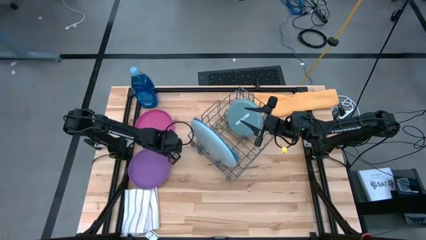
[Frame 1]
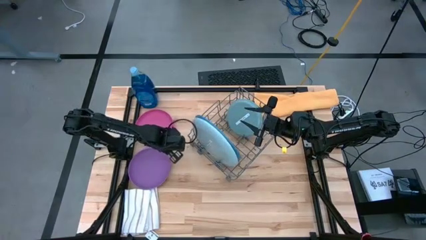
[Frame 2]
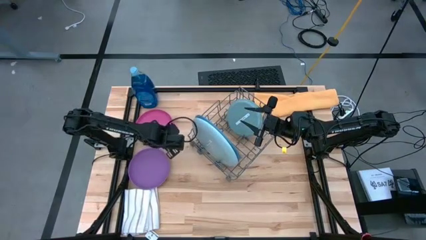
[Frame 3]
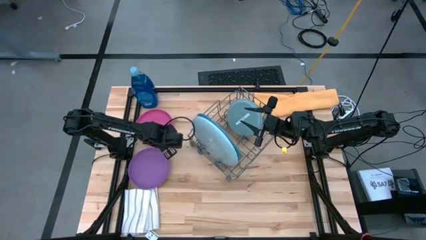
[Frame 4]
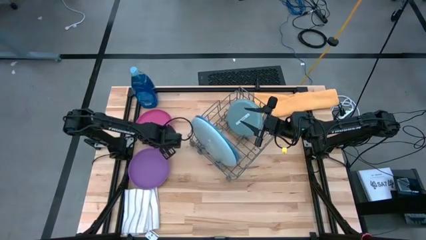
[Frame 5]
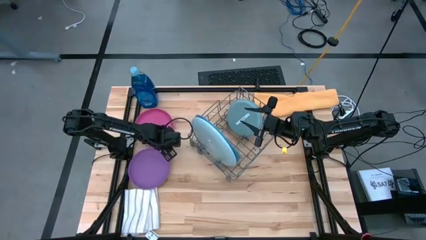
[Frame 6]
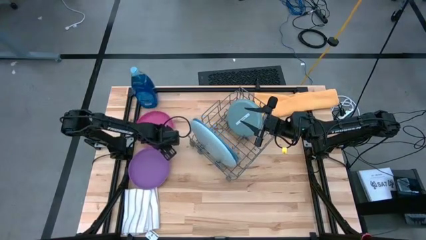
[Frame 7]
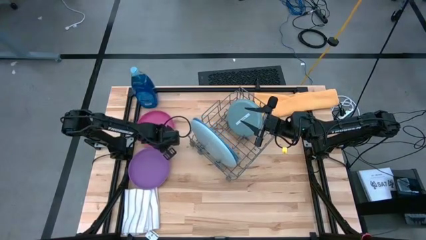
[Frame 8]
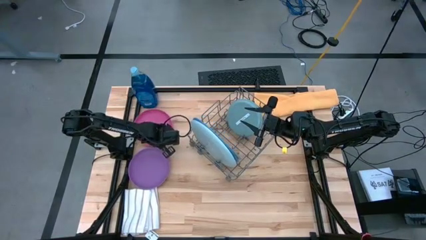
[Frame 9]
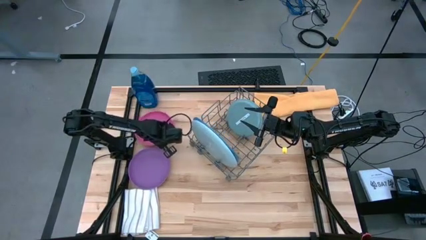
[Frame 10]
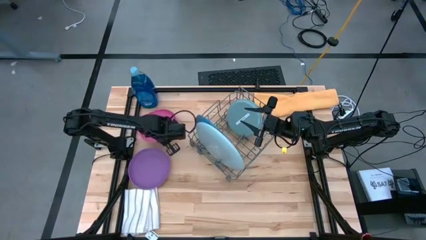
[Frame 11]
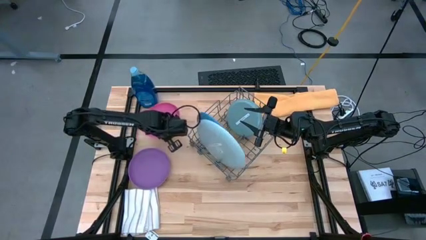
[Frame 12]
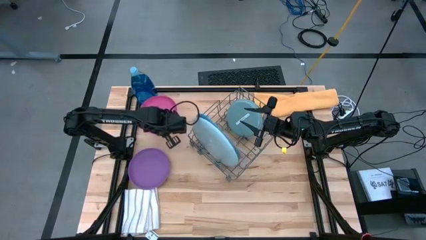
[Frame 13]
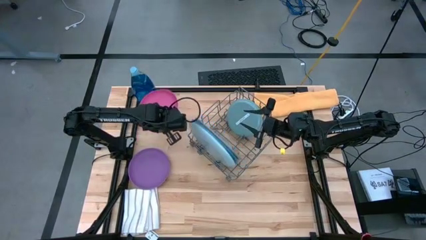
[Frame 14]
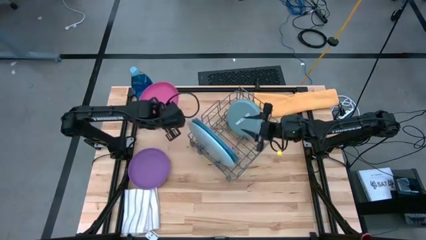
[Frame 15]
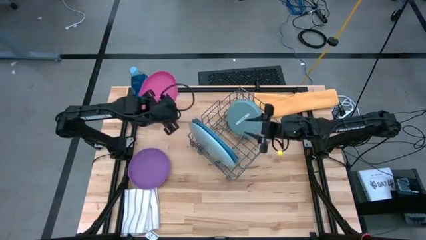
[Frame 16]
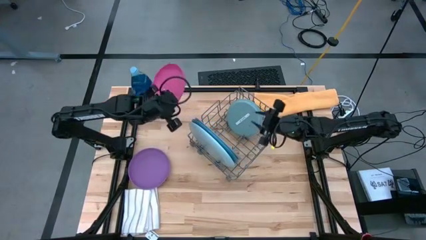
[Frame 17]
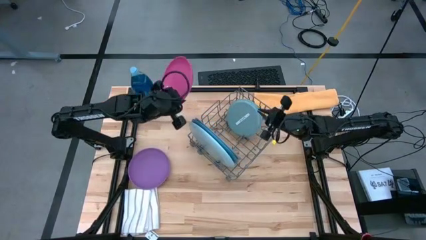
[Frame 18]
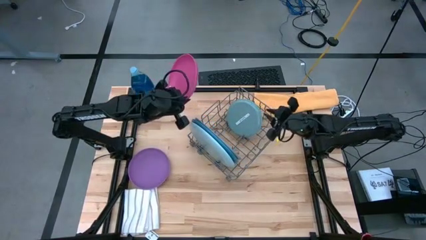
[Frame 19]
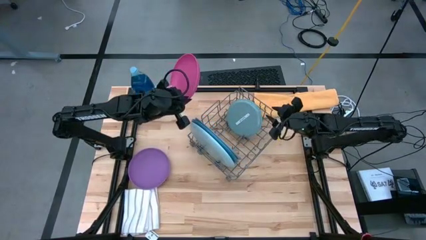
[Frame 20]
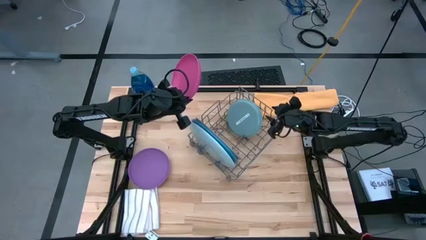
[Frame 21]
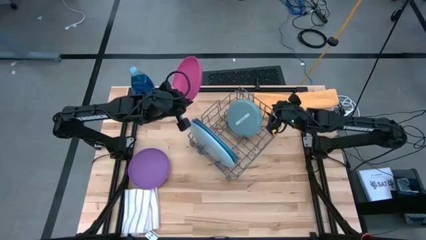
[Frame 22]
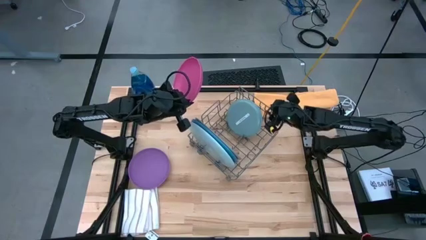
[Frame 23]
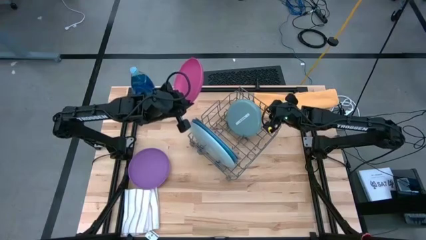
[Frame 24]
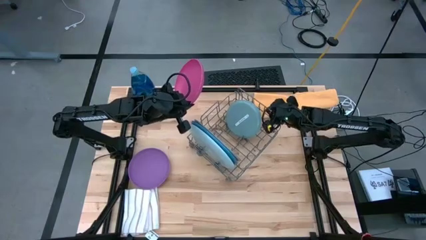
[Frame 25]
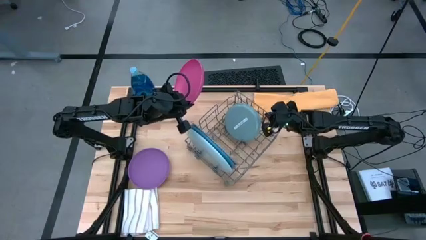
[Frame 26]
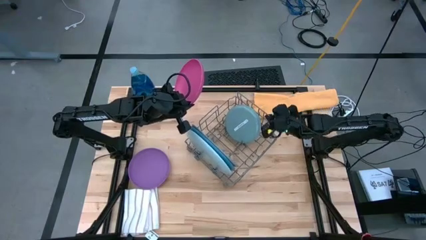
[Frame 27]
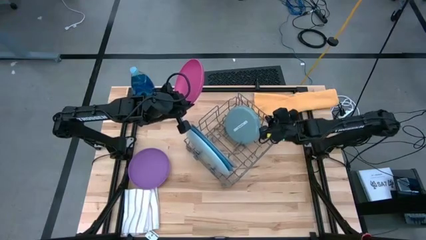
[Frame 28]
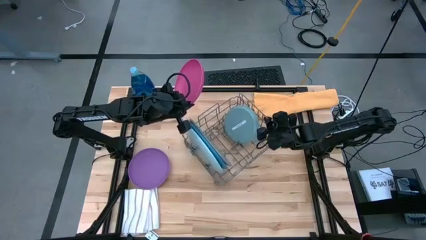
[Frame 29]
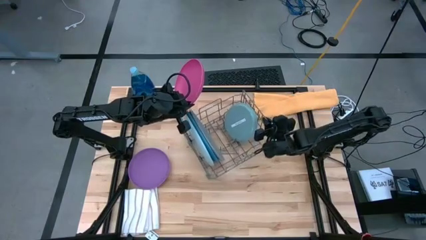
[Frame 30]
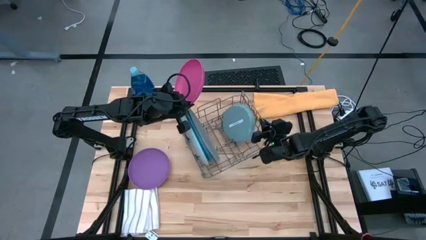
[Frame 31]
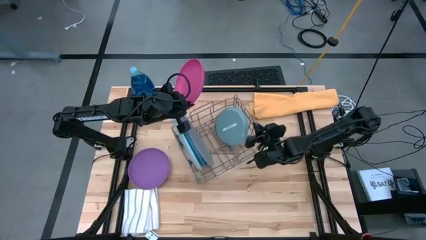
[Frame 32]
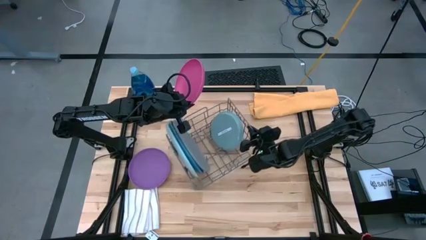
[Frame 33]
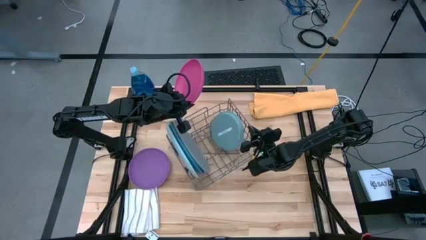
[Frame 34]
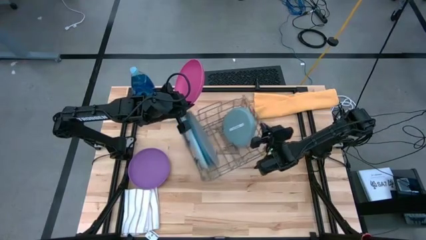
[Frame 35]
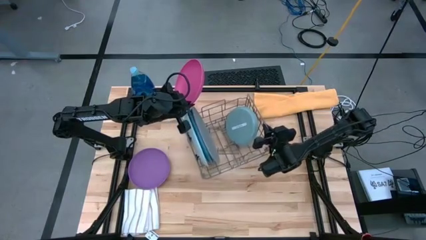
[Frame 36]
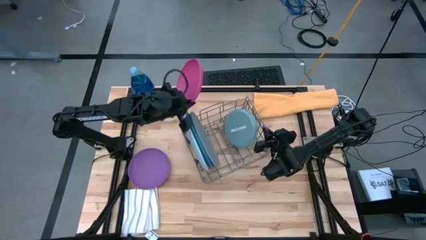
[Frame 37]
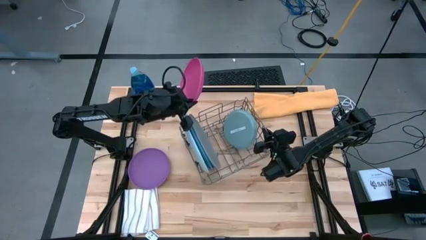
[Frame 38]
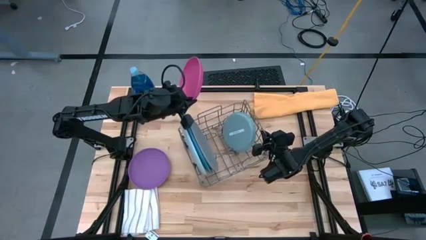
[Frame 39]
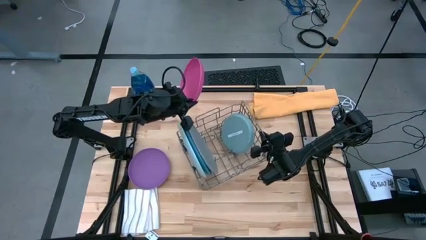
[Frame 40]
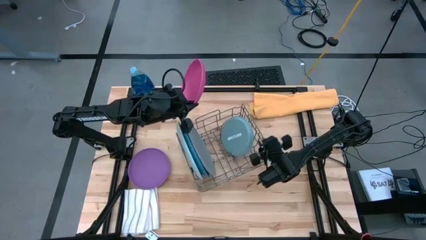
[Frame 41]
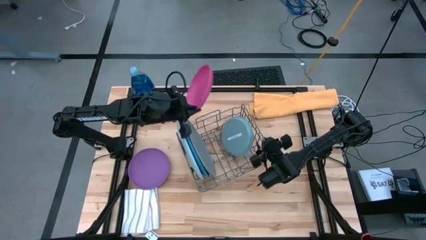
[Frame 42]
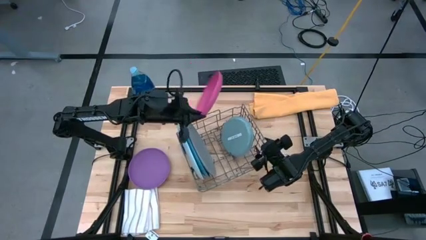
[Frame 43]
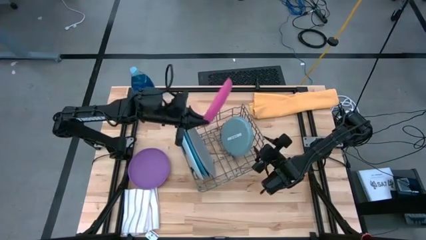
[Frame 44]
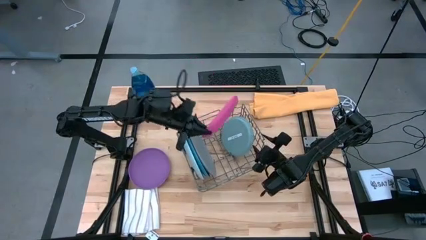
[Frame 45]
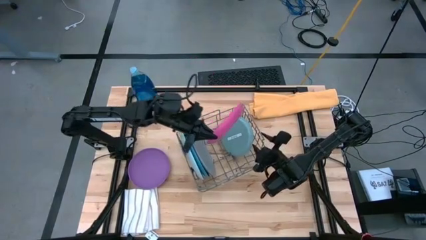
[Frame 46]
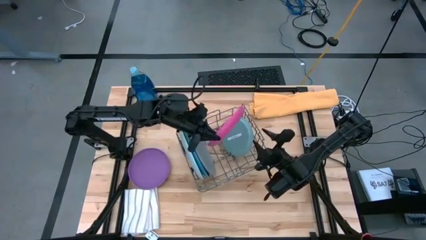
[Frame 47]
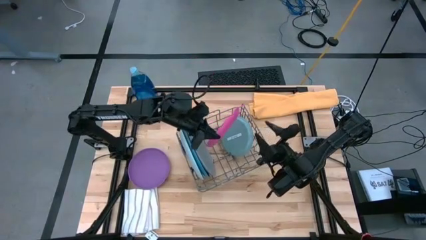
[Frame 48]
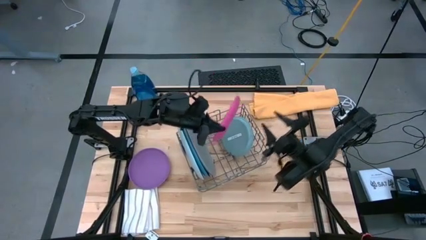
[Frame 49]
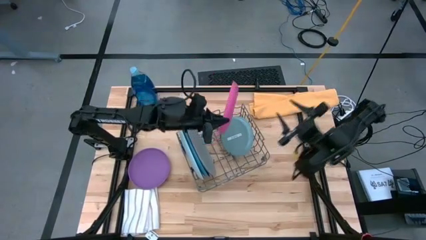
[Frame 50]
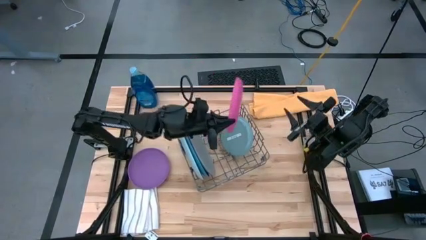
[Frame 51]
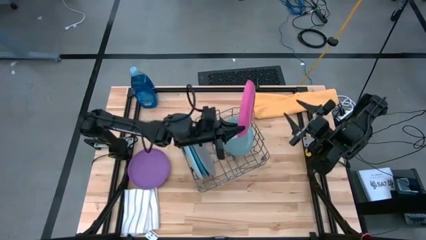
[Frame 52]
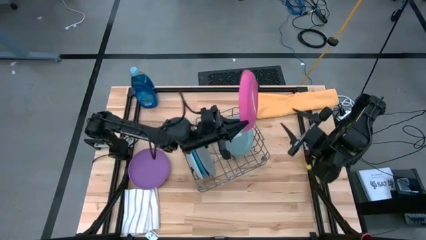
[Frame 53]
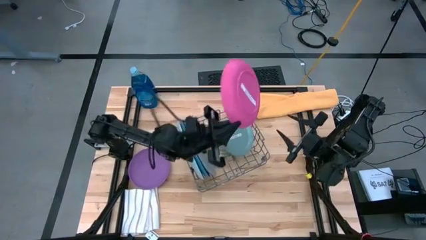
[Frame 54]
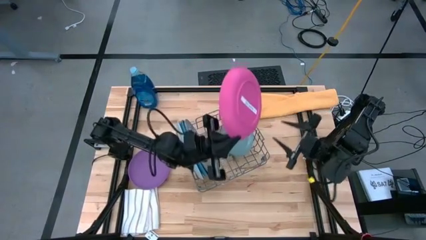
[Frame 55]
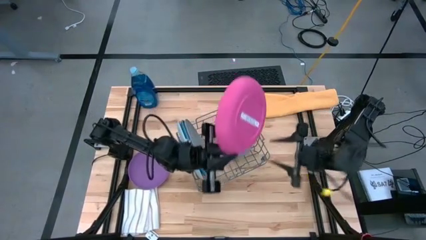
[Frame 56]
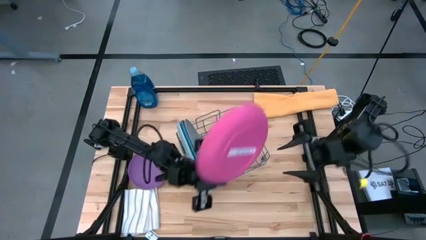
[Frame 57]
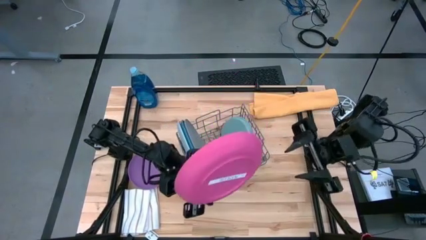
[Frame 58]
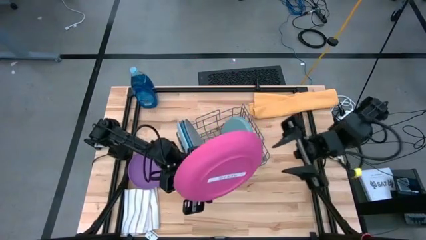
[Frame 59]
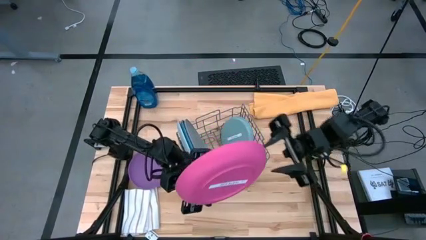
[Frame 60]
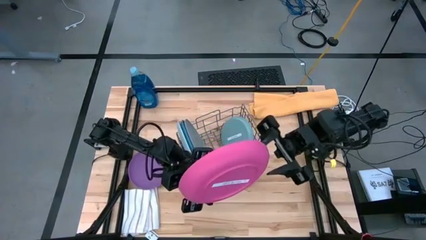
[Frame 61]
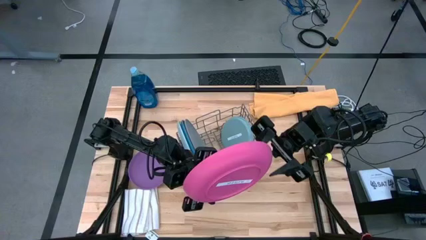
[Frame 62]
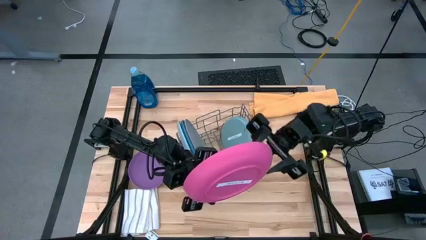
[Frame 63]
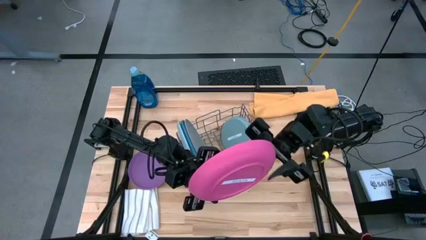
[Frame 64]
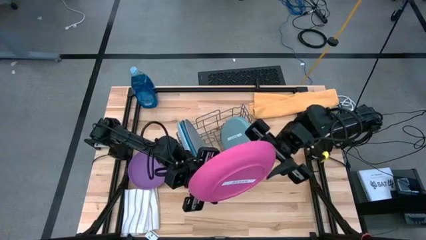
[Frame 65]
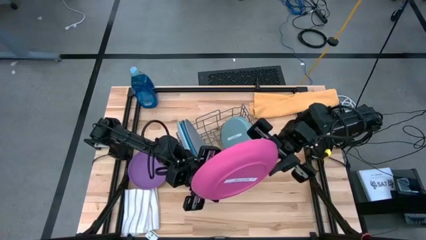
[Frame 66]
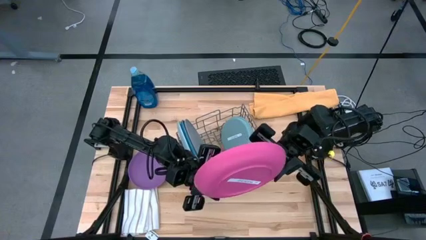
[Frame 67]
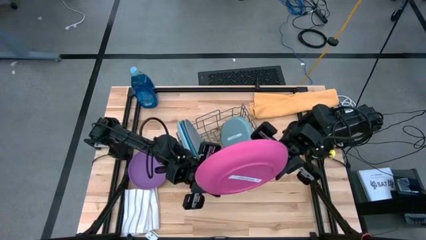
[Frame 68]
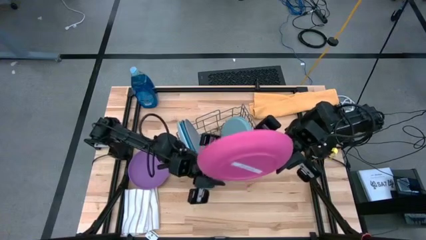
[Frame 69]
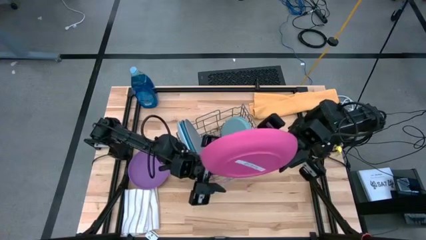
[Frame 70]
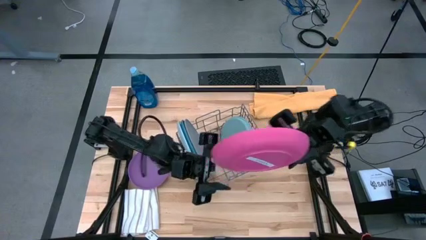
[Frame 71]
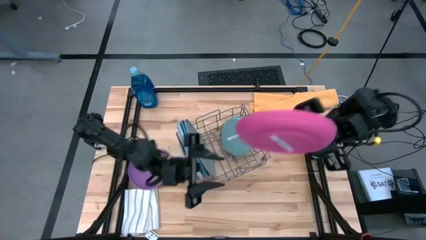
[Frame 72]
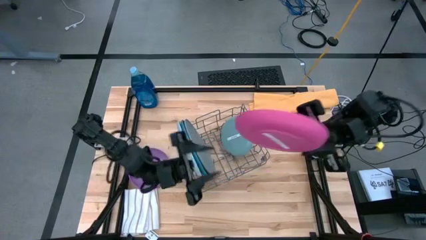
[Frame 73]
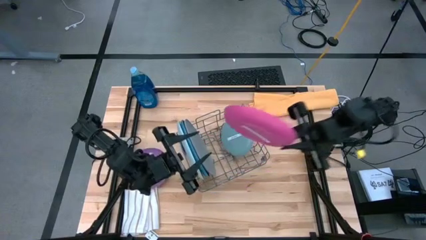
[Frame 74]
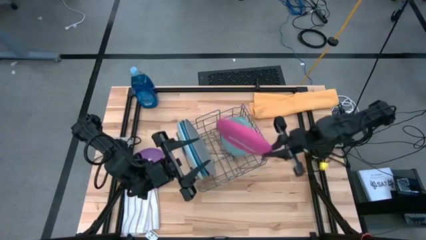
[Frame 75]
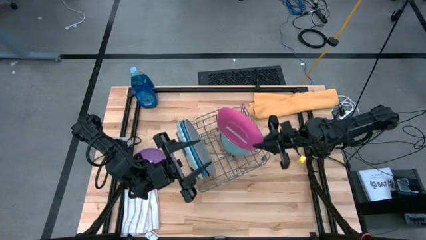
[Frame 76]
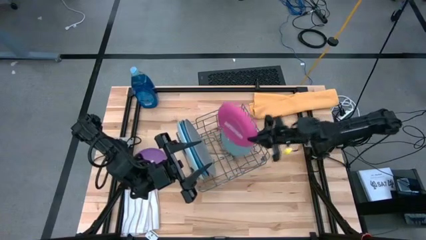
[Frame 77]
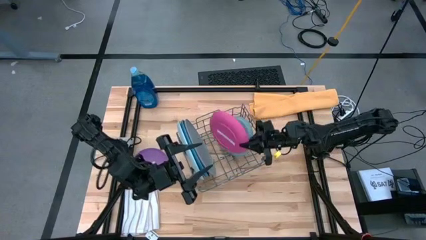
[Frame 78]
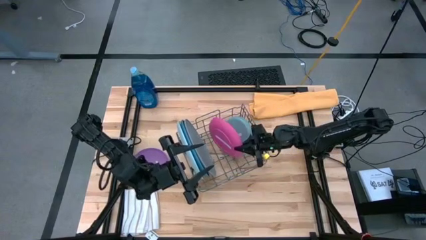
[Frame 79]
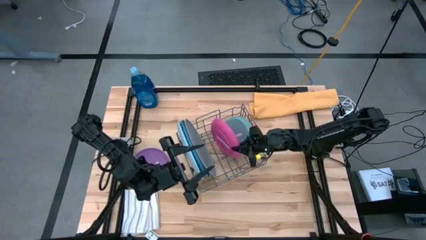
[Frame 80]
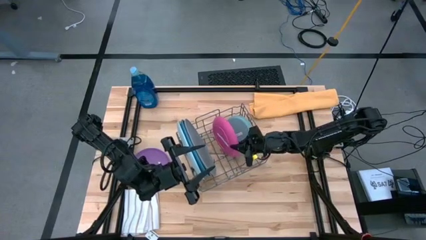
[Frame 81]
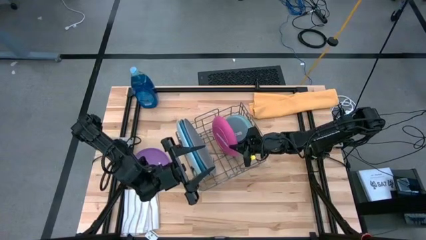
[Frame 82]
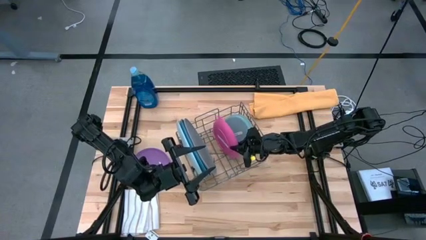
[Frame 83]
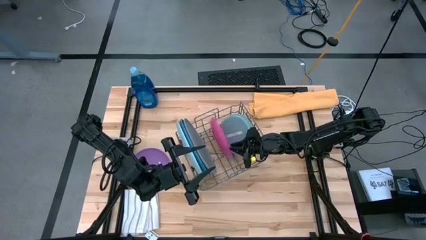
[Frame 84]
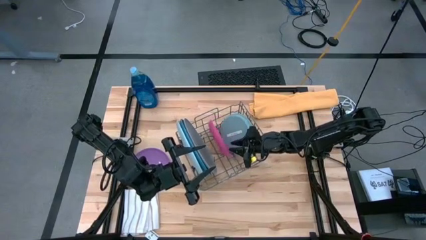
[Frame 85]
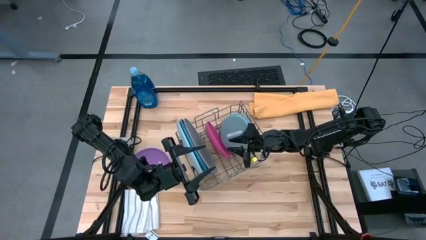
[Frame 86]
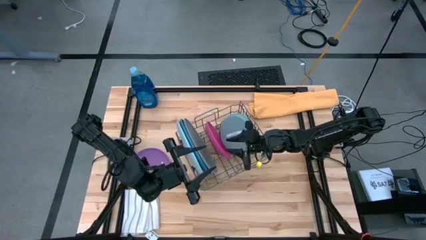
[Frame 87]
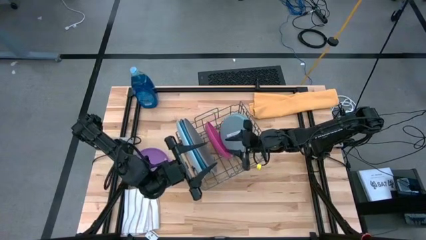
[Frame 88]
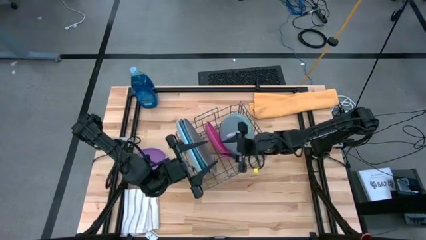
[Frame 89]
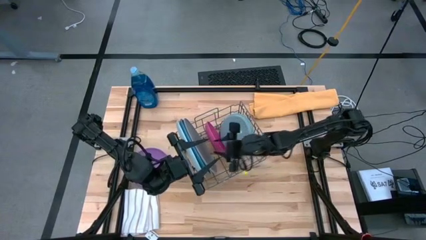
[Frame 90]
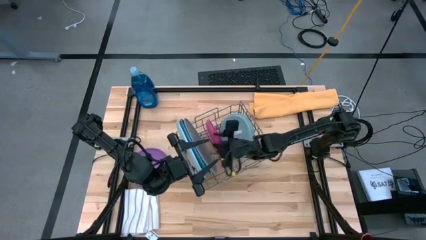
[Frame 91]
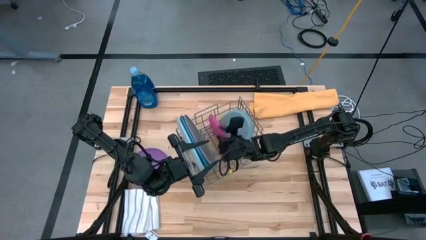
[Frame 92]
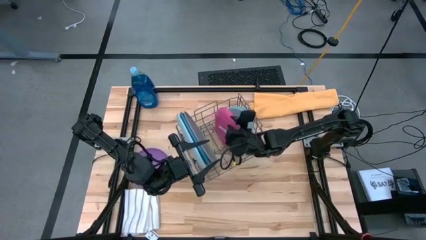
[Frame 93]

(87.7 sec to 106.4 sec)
Task: Sort dishes
Put the pink plate into the dish rack
